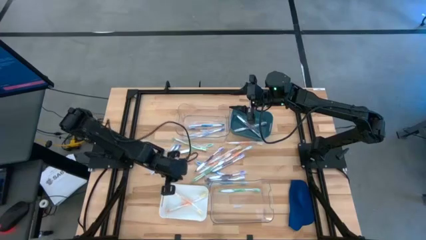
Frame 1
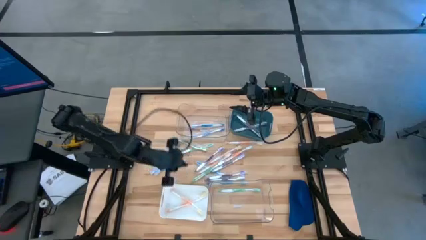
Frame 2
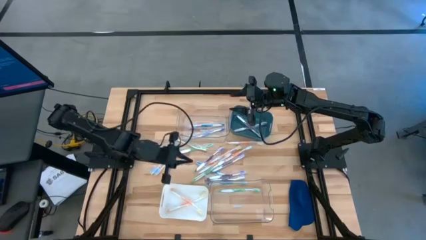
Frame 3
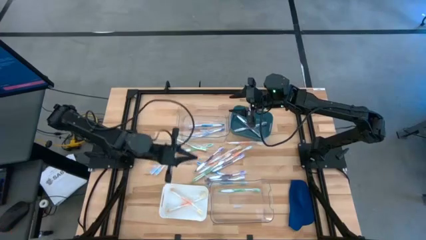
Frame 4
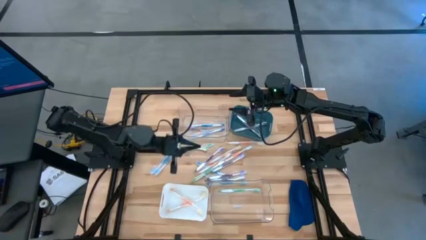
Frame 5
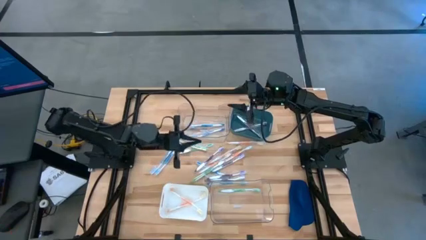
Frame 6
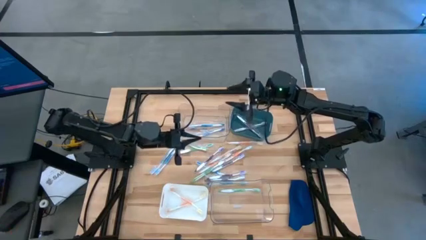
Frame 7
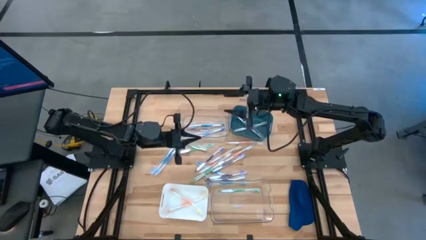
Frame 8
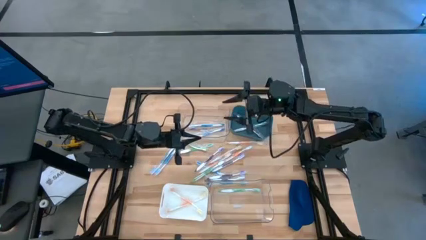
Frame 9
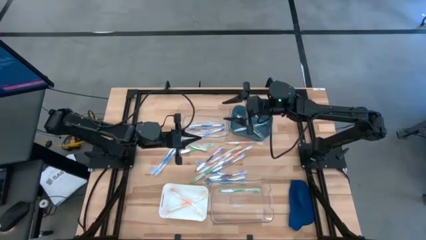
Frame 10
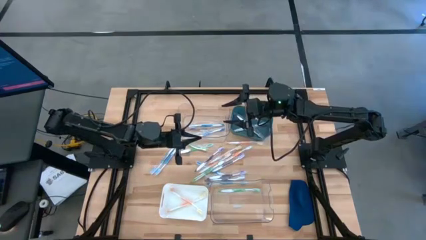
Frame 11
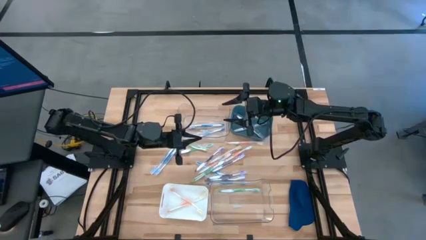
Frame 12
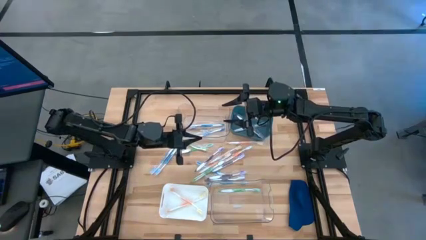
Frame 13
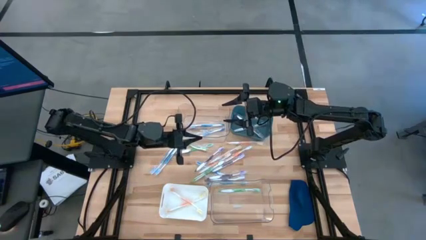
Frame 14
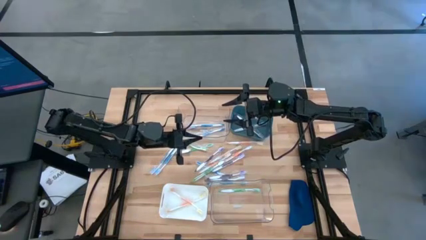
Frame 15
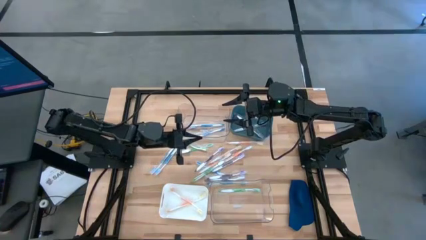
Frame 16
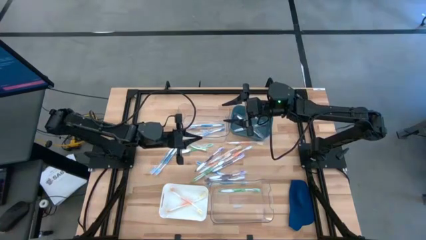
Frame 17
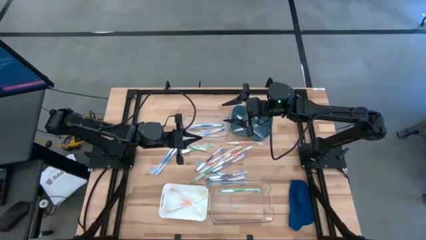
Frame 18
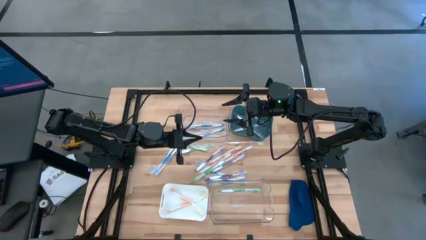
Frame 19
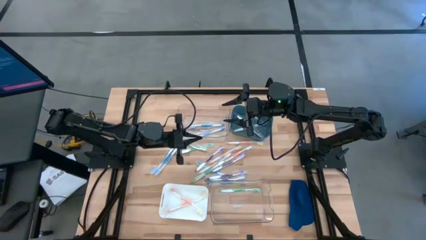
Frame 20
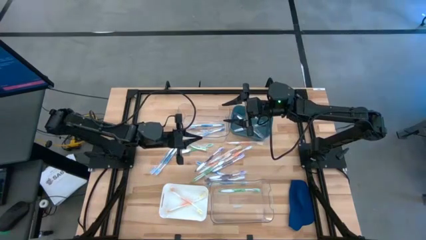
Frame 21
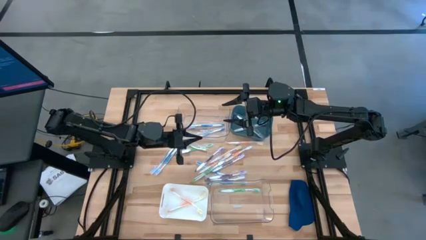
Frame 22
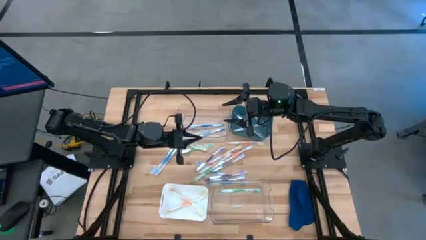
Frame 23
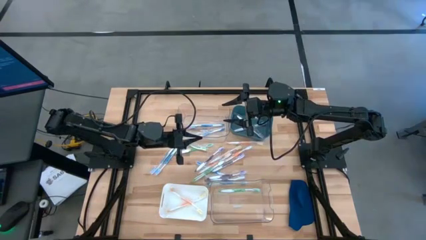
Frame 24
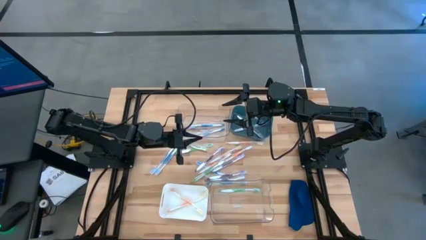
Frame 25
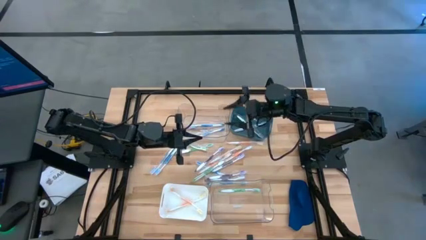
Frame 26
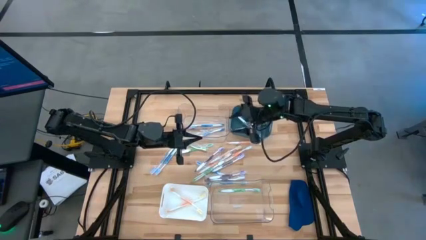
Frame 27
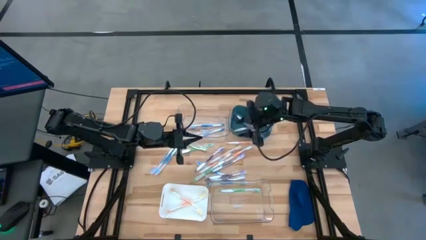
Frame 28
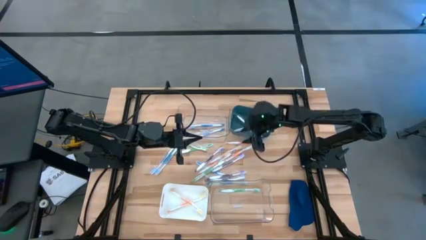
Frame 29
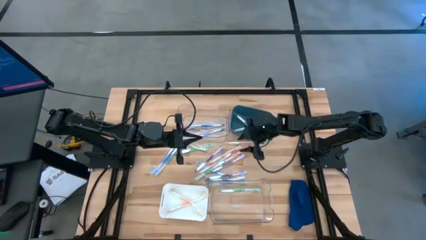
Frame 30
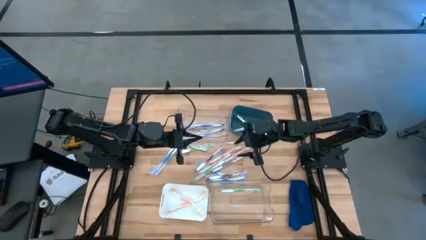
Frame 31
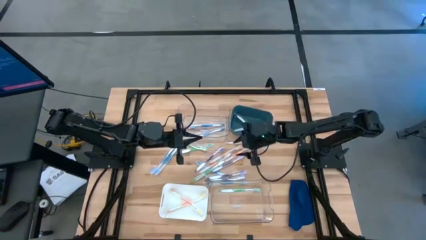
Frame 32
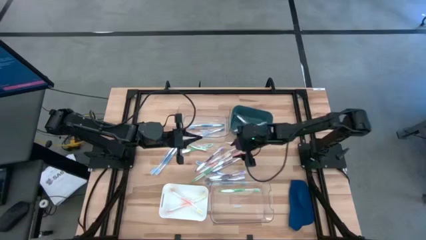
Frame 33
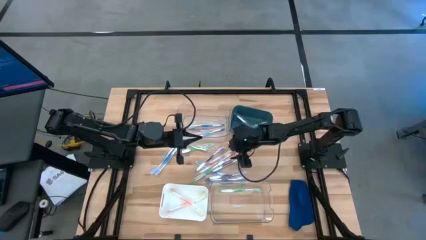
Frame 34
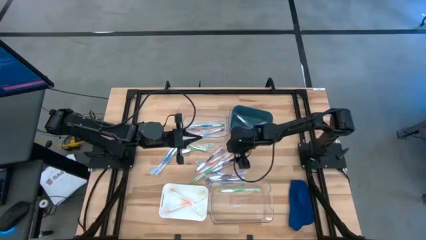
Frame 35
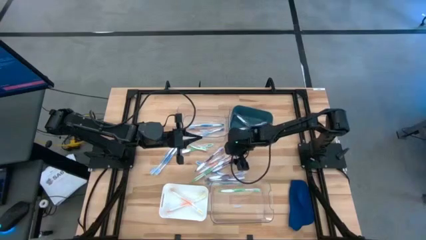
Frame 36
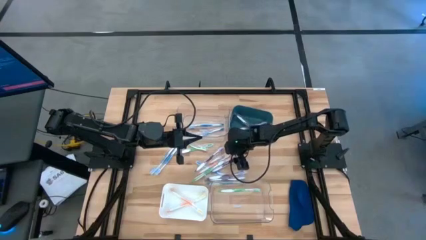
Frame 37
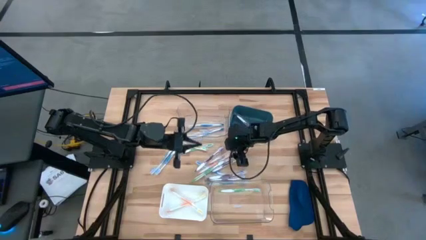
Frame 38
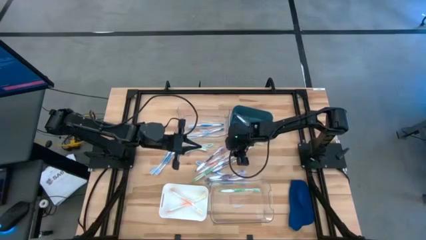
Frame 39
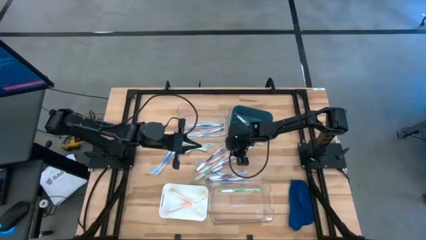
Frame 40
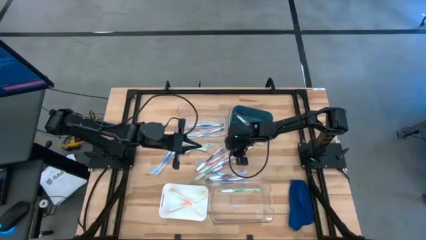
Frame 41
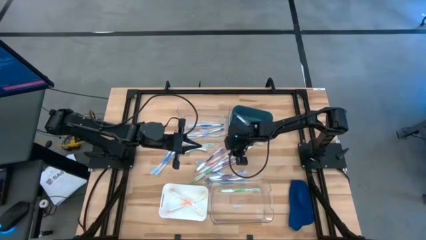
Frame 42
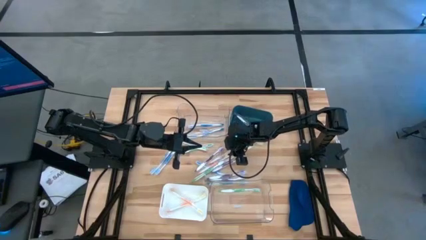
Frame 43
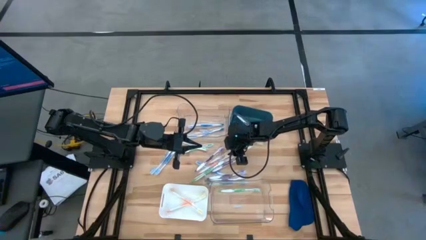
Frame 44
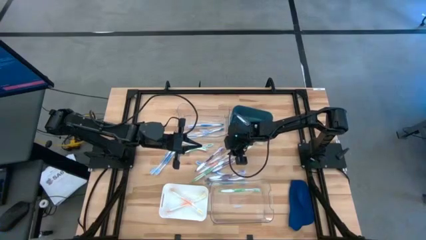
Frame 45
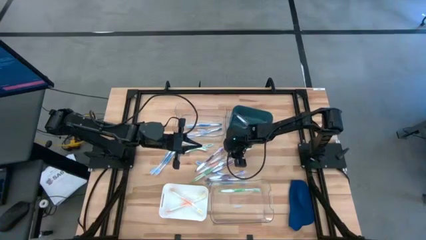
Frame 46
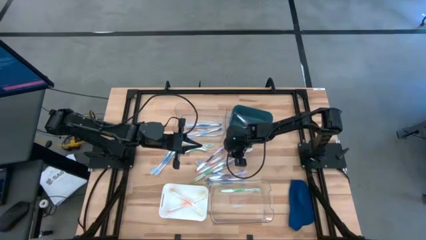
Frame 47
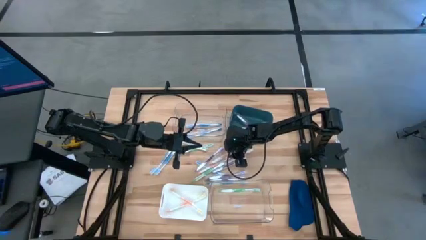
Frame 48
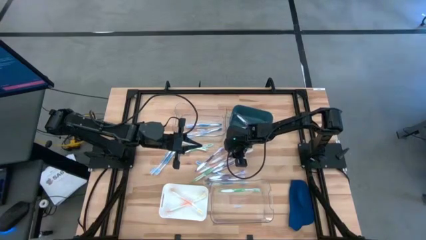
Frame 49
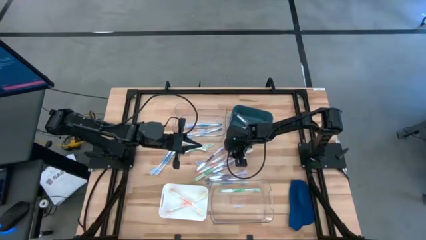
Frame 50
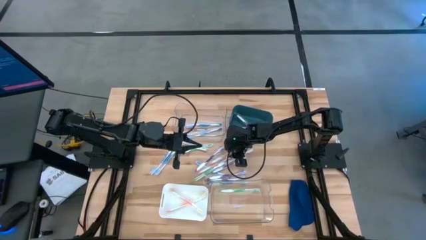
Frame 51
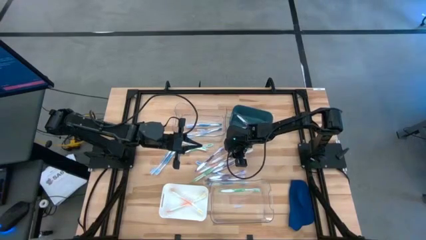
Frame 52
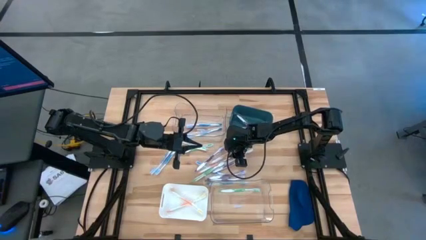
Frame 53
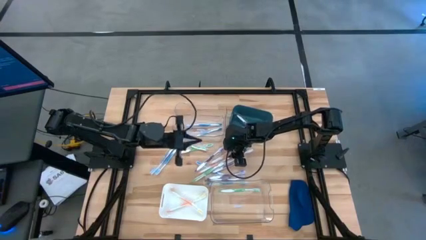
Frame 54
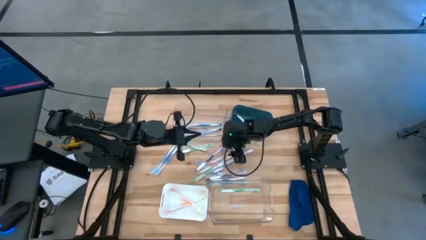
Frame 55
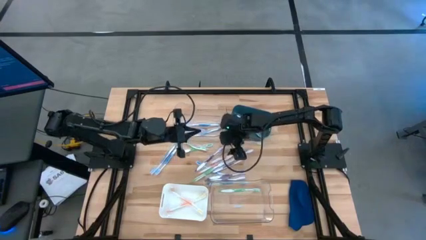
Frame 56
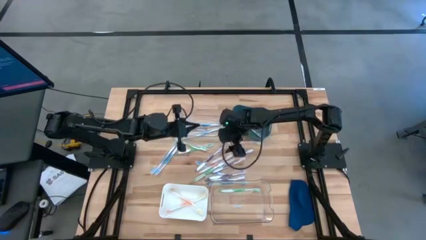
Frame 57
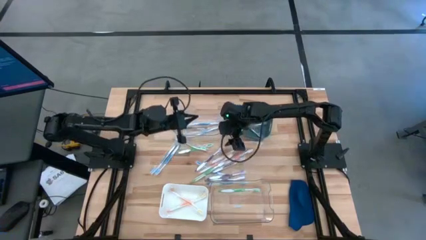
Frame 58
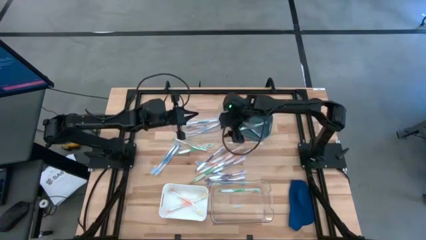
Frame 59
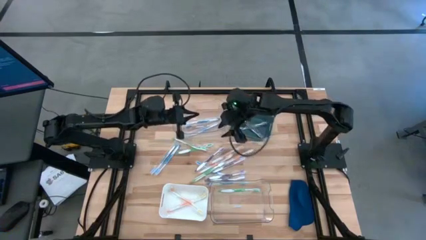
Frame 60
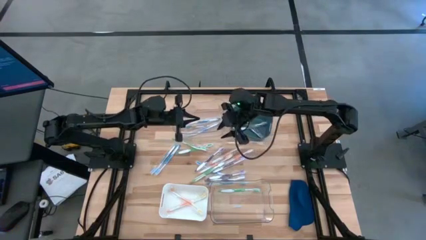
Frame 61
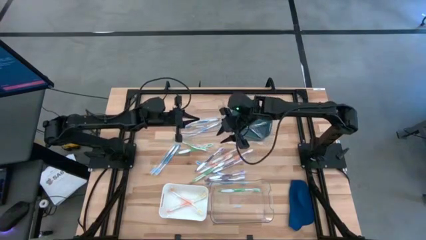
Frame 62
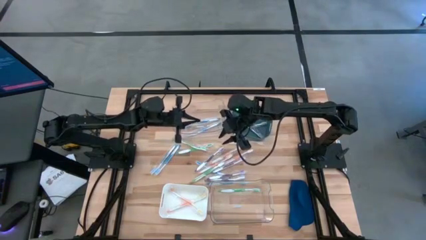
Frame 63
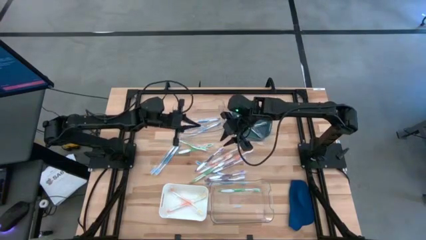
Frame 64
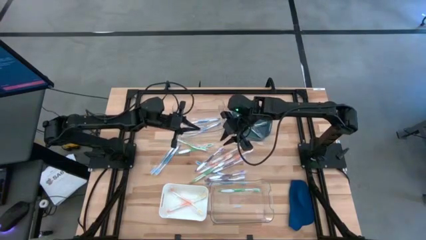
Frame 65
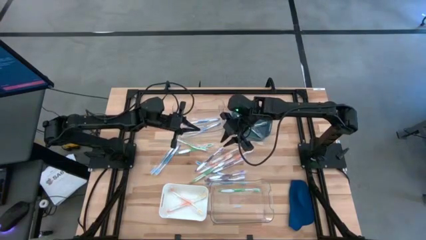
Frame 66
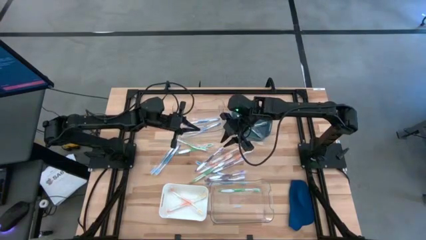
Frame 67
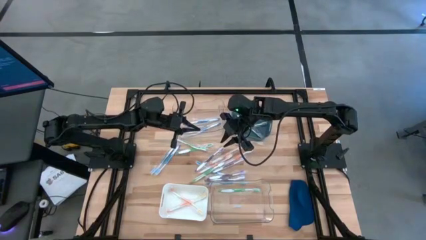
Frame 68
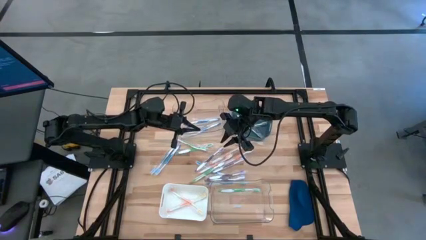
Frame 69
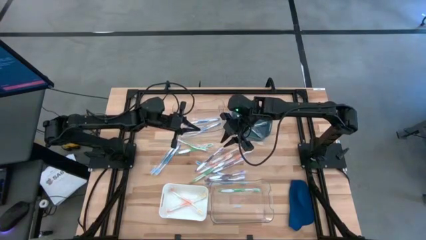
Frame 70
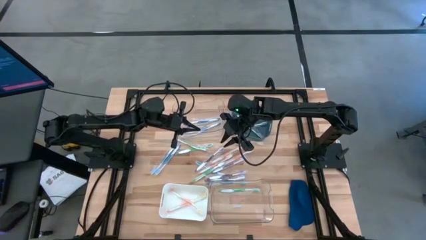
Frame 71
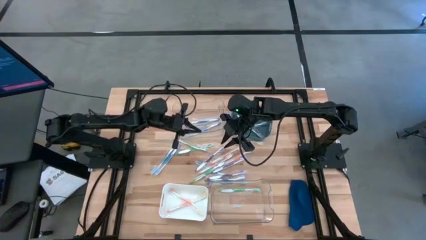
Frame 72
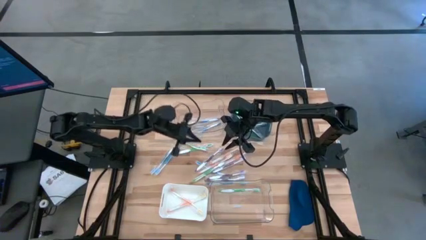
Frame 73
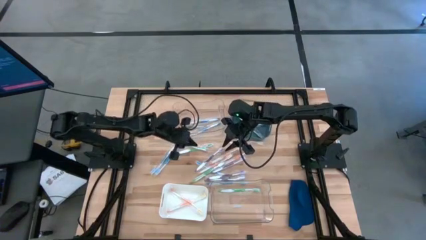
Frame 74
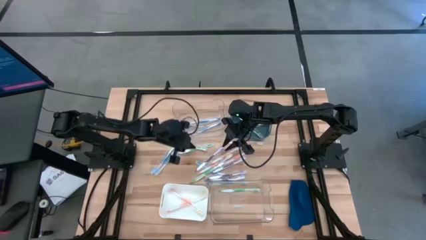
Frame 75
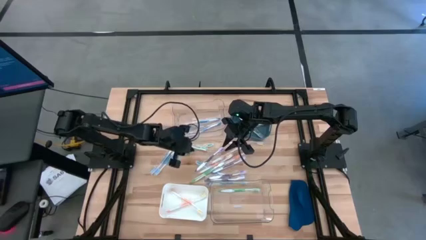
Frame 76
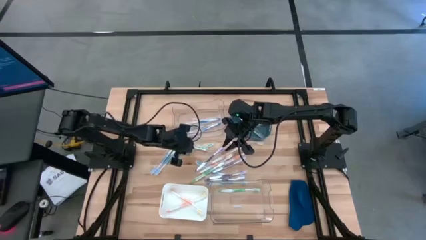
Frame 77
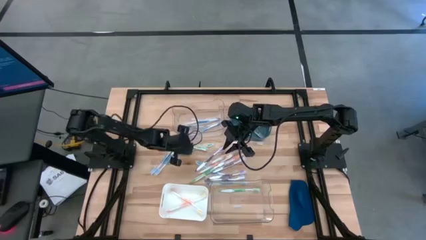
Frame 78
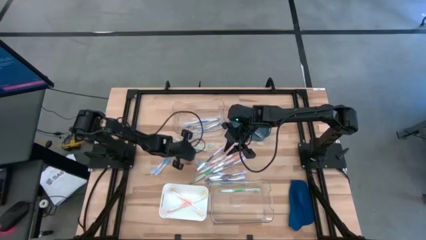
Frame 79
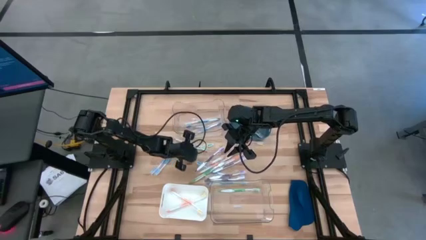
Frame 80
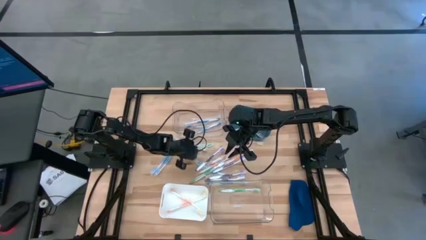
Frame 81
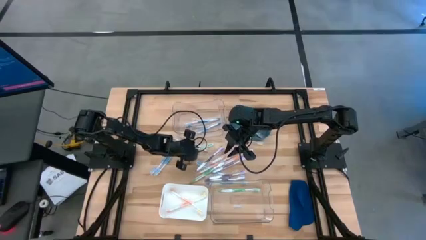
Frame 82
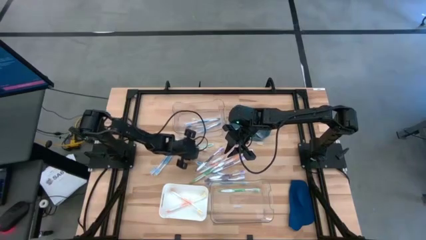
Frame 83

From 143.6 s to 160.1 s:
Task: Pick & Place Toothbrushes
Put the green toothbrush into the bottom transparent bin
